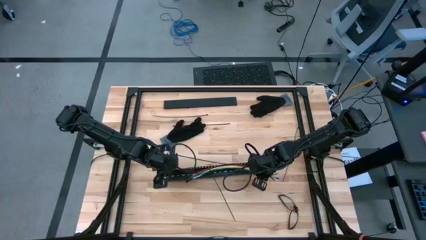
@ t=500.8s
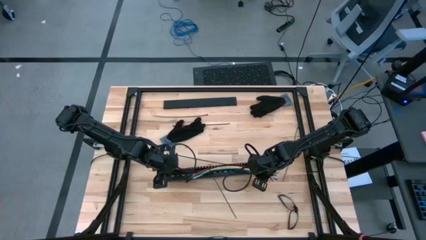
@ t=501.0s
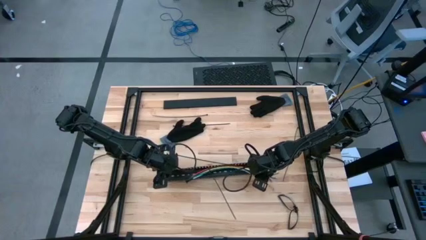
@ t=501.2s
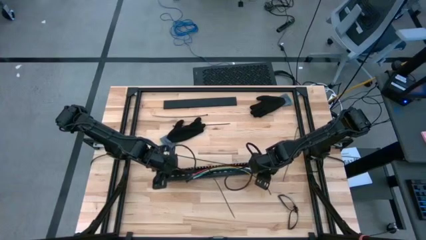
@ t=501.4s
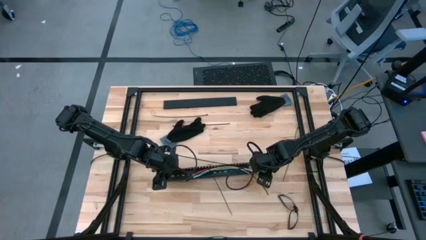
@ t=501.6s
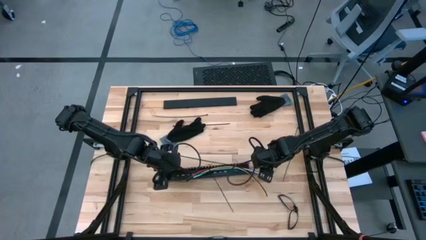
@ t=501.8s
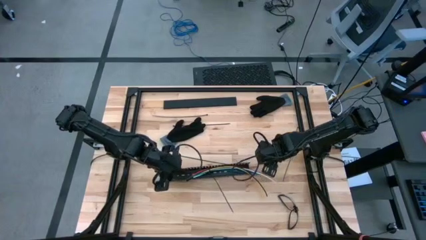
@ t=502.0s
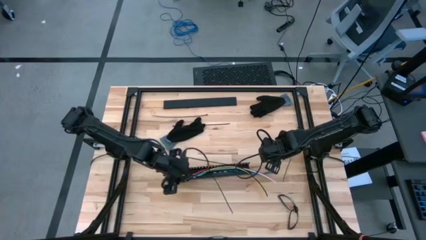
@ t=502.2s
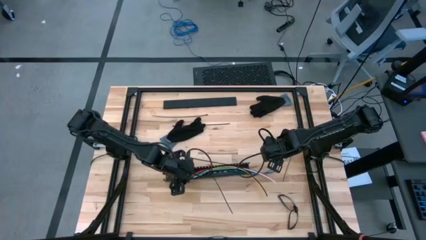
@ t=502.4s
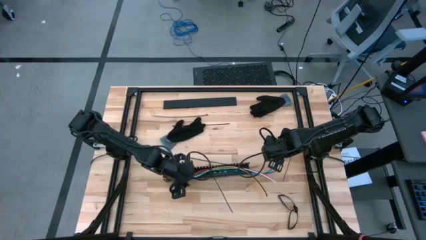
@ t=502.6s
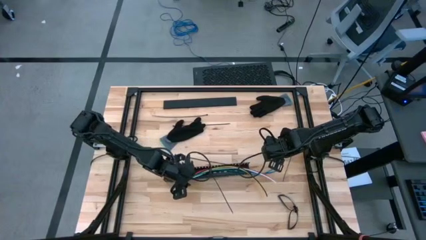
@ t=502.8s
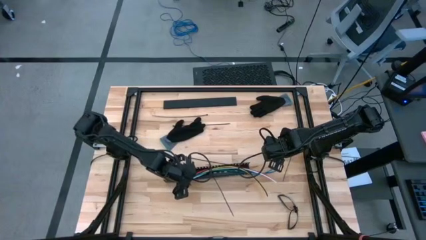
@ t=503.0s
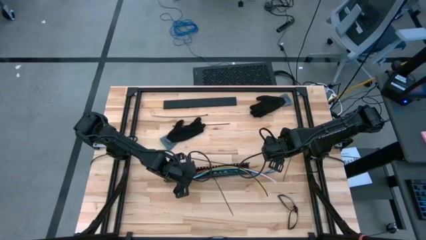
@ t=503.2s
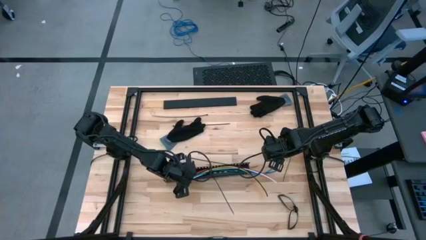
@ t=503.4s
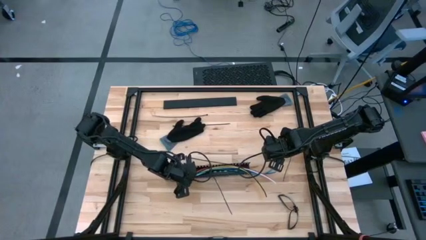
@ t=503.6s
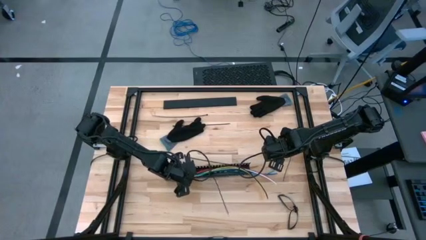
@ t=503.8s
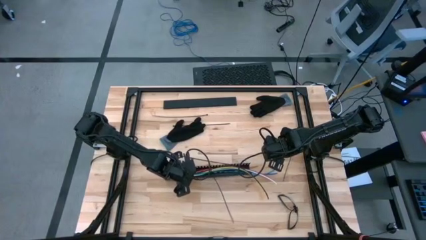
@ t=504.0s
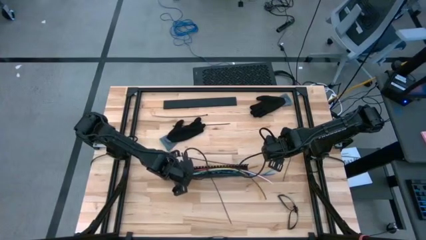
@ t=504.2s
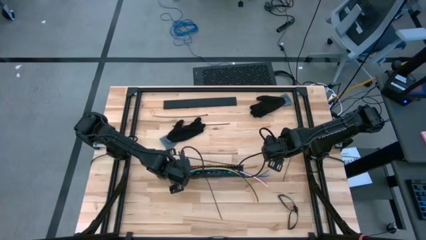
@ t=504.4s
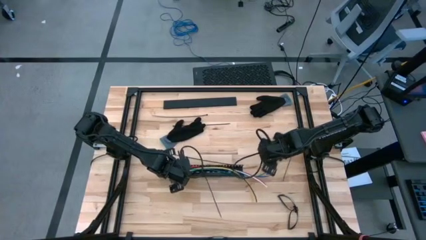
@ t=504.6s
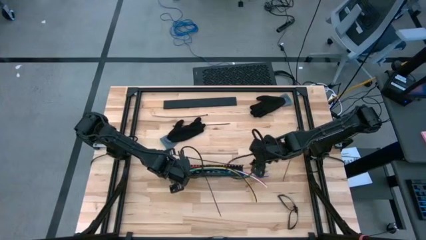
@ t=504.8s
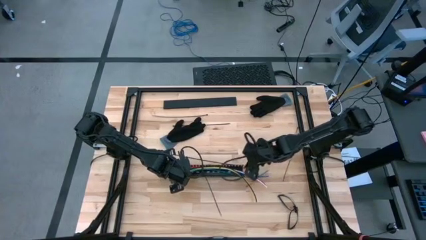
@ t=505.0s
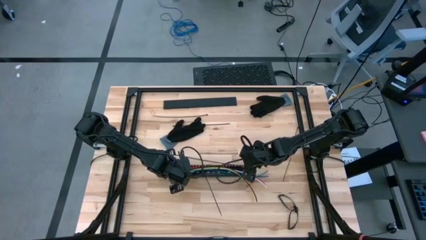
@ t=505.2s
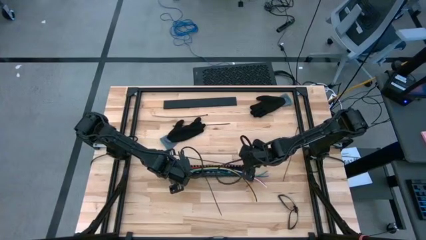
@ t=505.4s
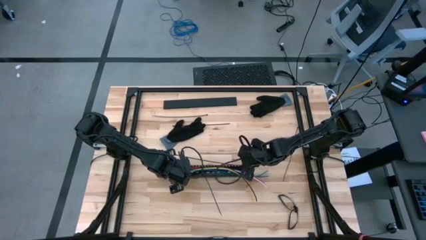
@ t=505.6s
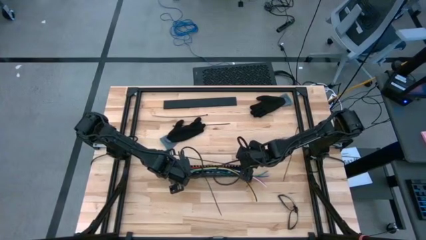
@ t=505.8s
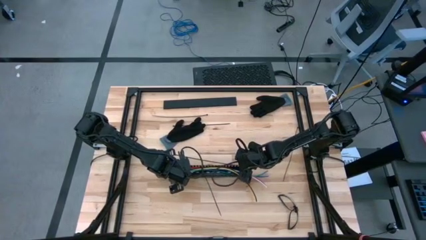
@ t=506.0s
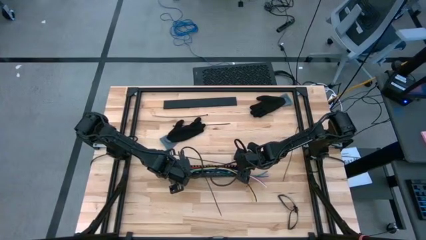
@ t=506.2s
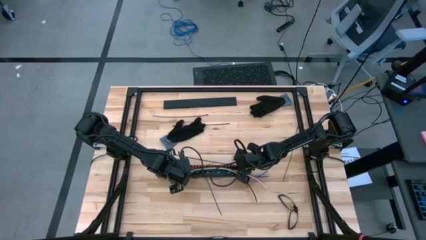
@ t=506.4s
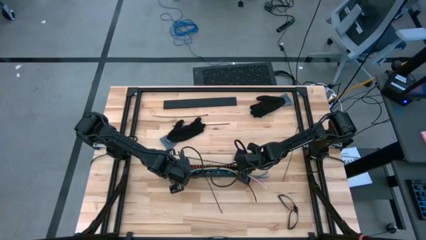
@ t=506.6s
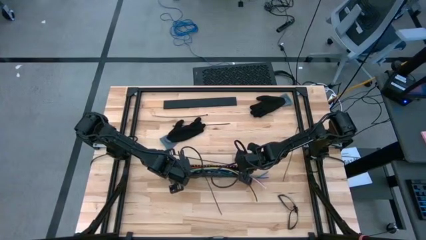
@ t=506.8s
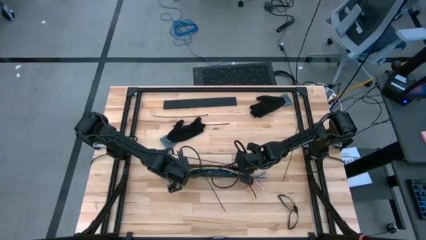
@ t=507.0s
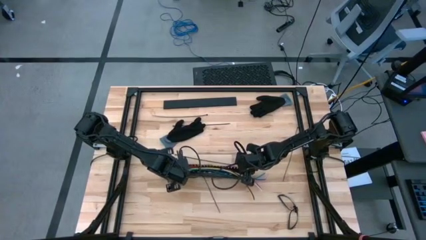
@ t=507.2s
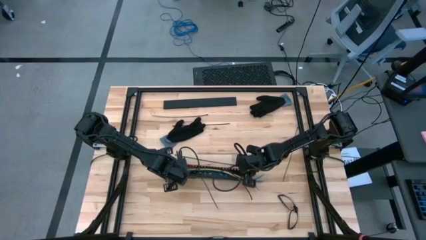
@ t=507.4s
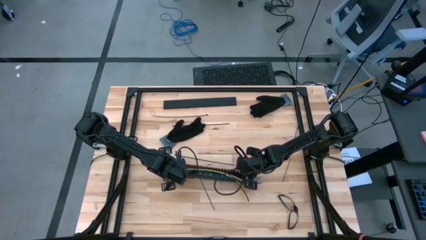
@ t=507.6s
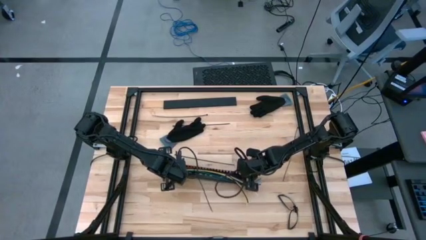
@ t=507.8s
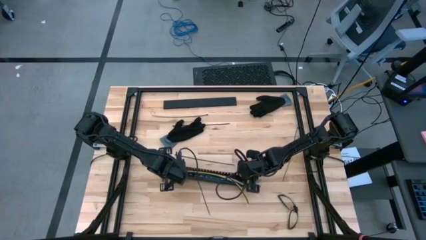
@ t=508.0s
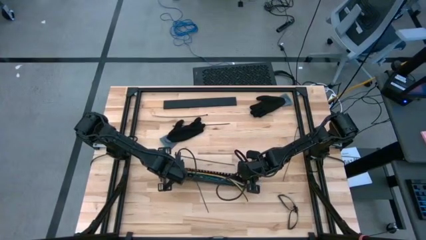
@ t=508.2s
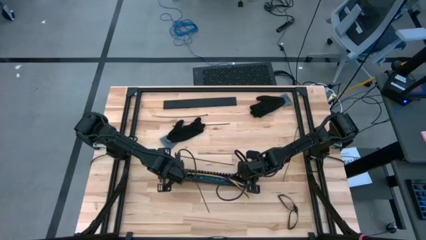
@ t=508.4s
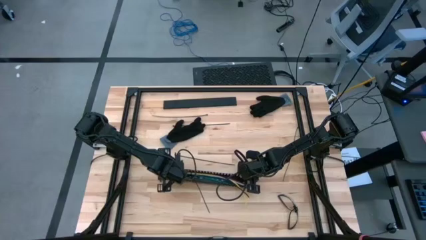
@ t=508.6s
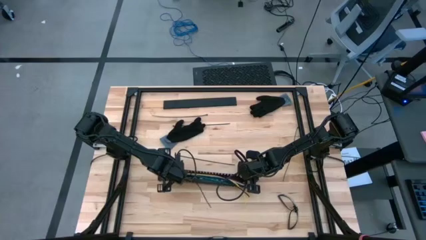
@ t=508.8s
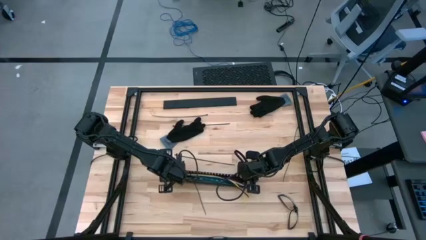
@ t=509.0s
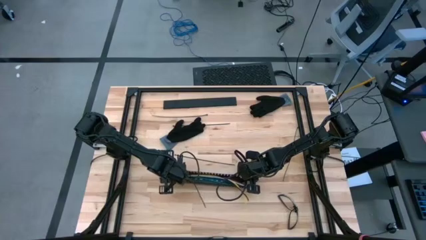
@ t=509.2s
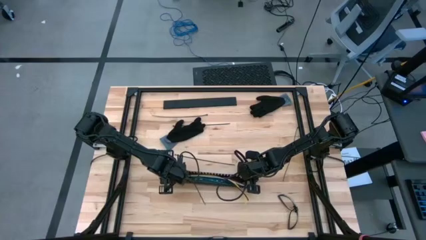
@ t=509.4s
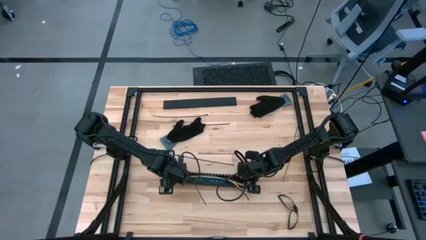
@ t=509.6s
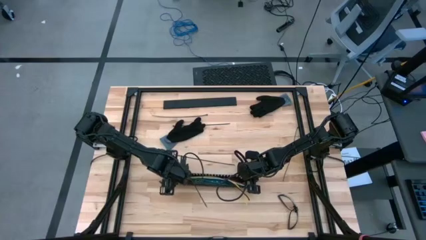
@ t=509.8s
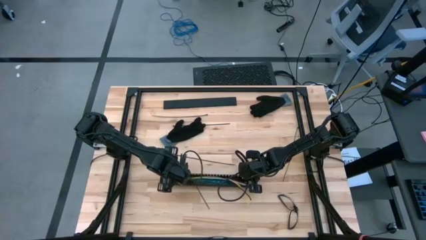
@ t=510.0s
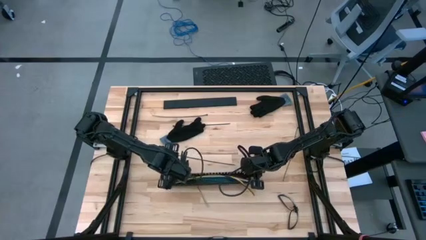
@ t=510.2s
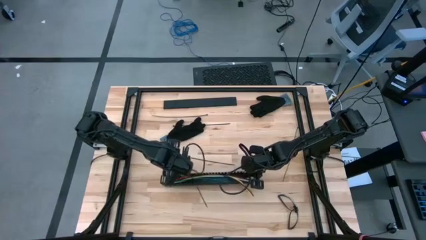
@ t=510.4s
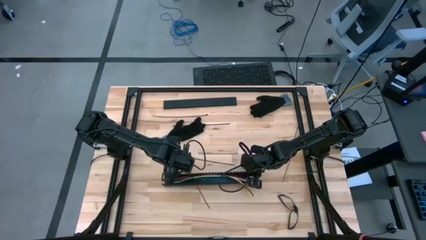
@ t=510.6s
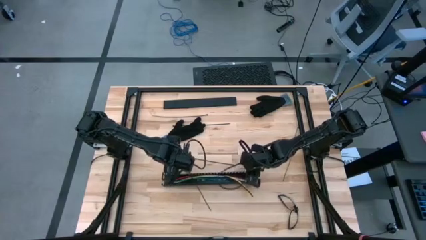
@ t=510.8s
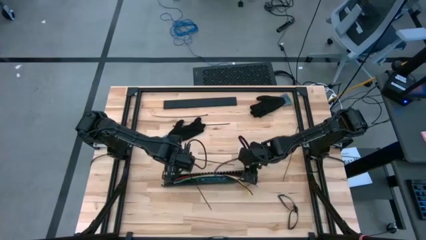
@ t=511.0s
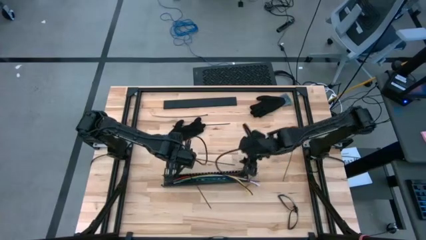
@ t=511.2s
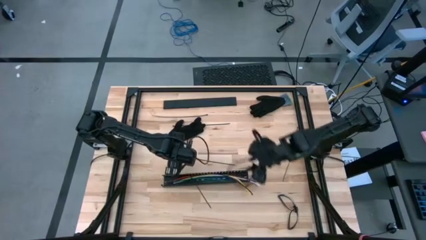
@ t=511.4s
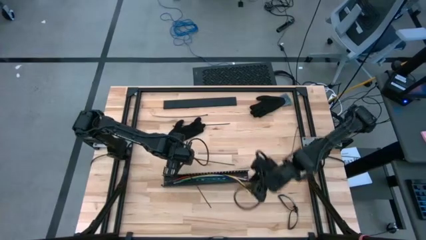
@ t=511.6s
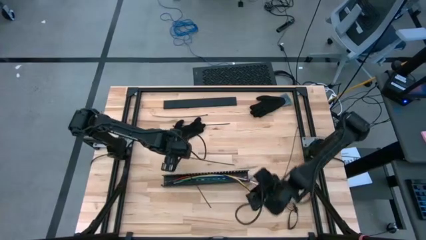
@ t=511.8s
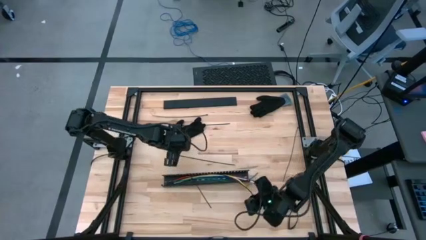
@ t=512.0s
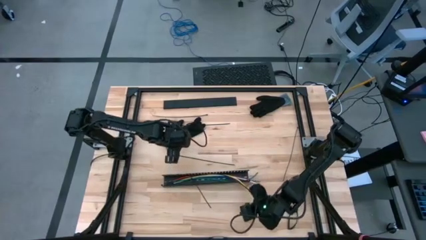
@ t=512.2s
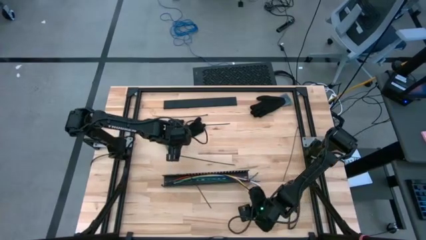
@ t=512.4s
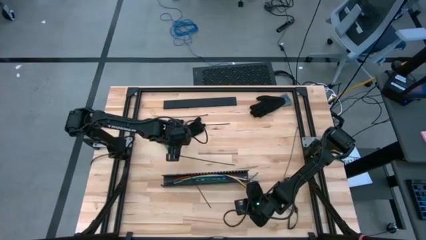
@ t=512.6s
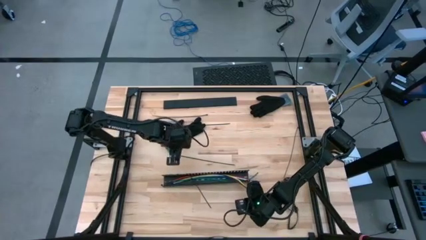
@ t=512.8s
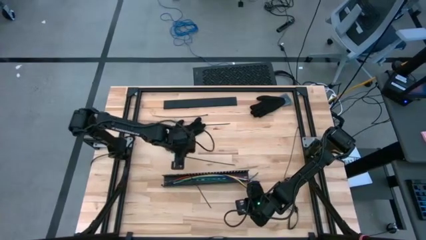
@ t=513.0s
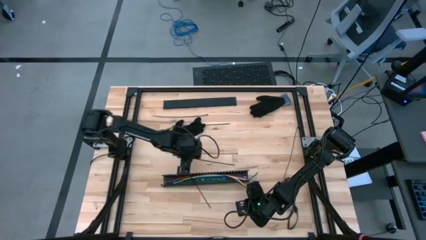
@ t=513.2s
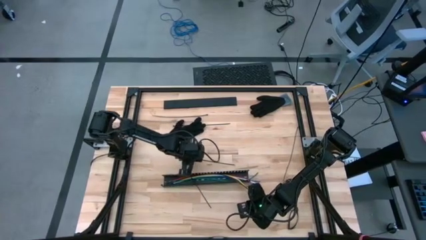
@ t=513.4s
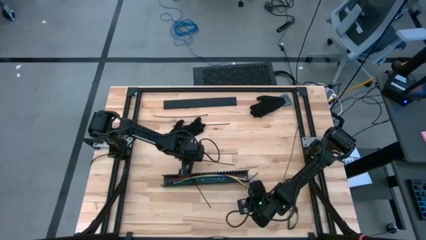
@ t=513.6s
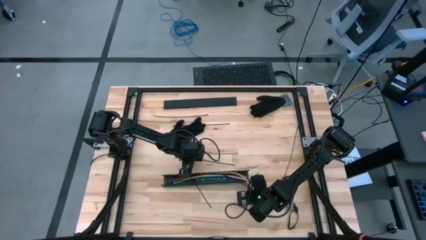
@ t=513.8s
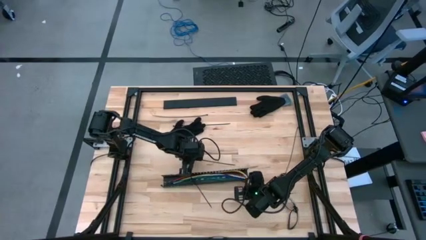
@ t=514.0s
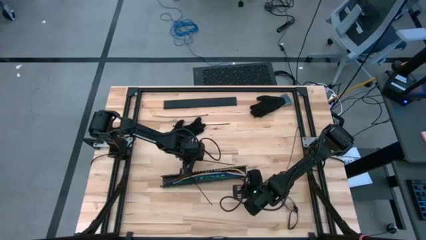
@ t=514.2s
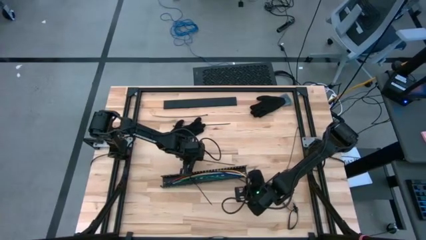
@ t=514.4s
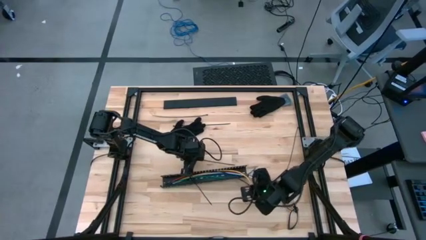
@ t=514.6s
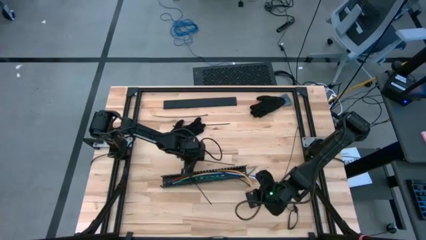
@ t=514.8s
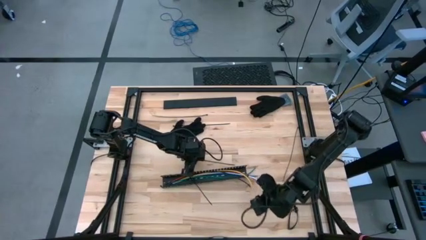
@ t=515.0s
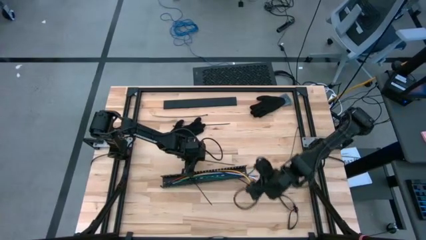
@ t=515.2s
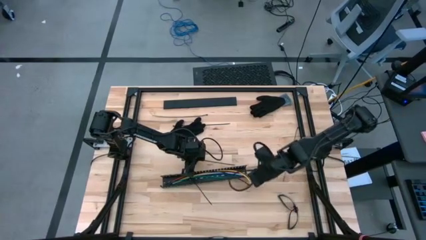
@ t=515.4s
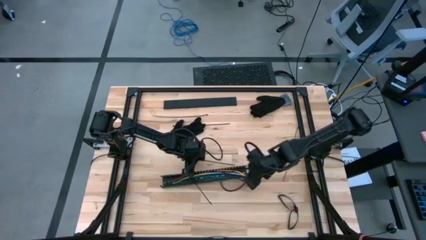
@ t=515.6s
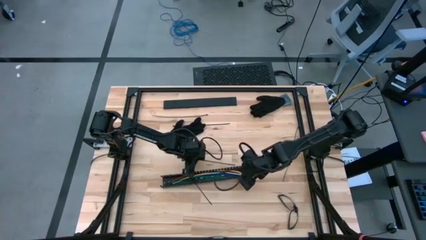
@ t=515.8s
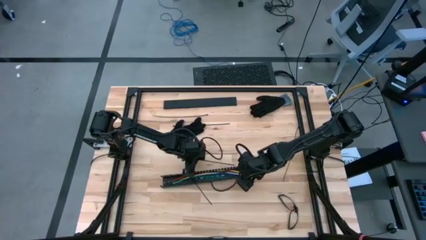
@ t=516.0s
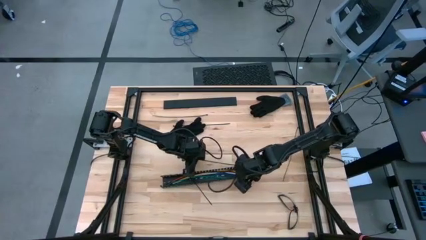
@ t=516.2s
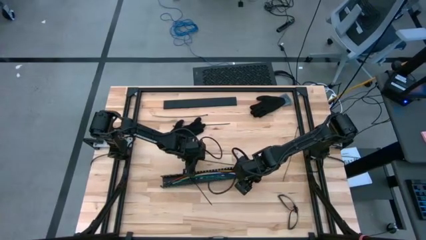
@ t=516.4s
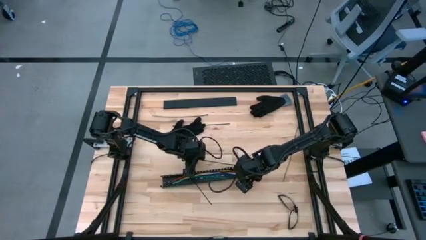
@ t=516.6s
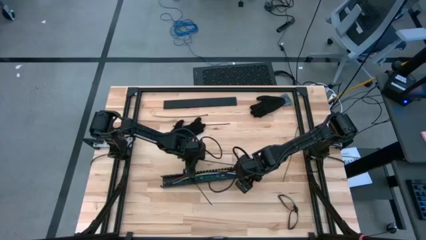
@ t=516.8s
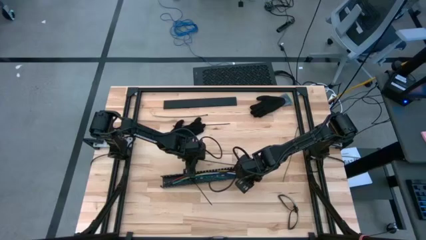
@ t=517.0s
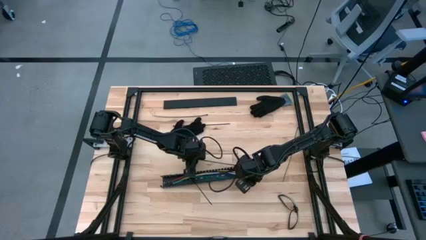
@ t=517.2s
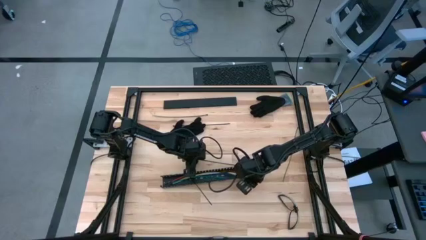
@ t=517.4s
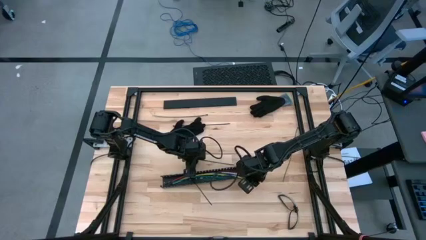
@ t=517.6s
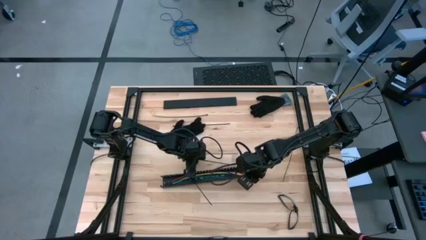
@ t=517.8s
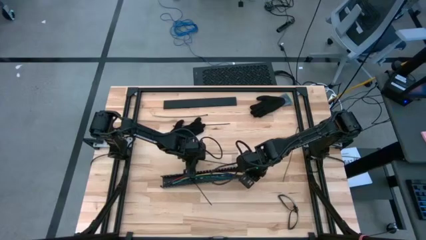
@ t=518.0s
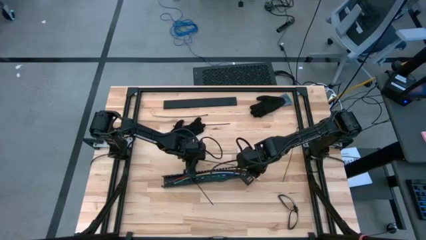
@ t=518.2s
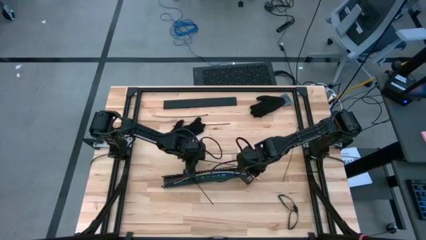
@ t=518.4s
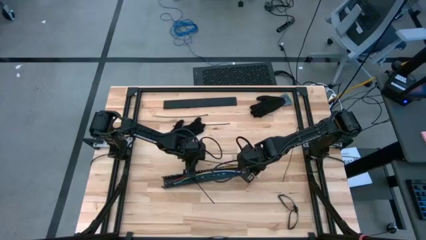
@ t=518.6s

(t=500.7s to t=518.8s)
Task: Ziptie cables
Put the zip tied cabled wires into the cable duct
